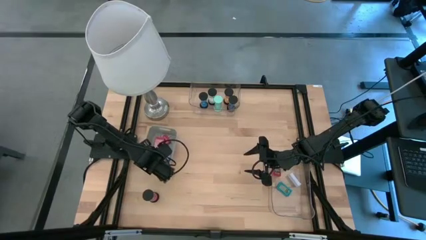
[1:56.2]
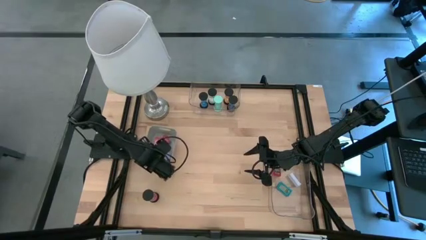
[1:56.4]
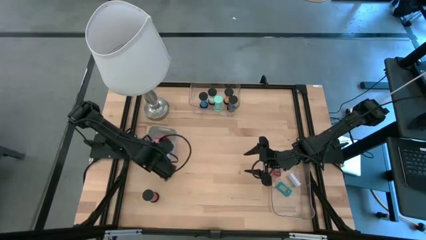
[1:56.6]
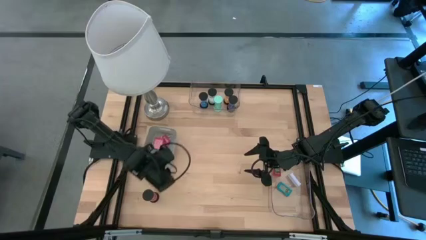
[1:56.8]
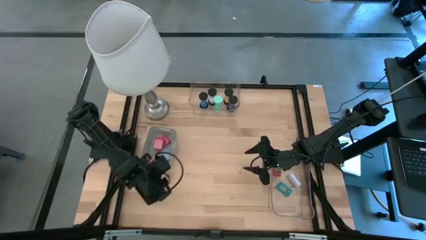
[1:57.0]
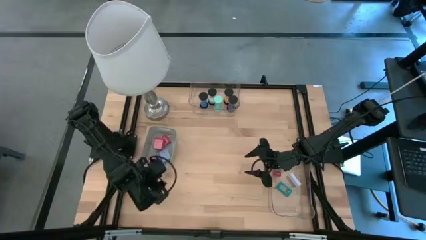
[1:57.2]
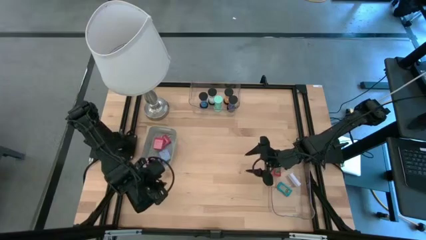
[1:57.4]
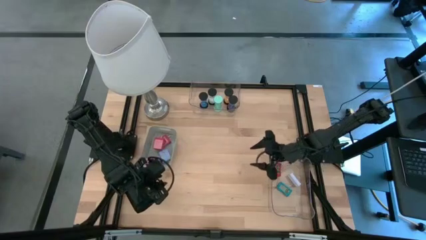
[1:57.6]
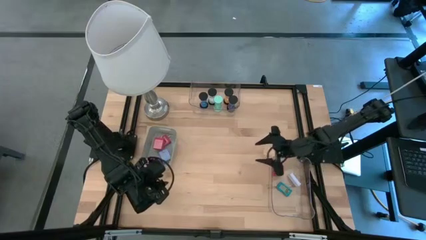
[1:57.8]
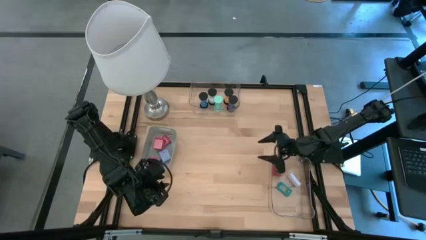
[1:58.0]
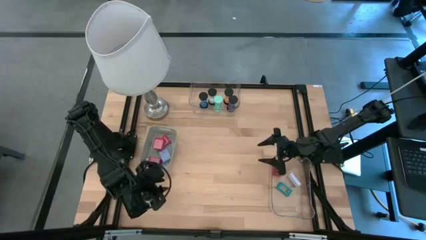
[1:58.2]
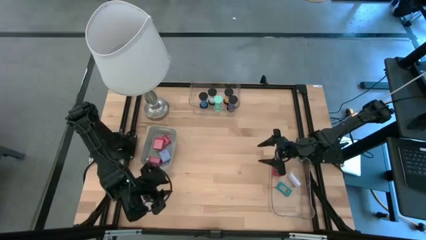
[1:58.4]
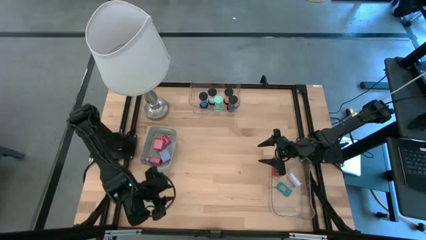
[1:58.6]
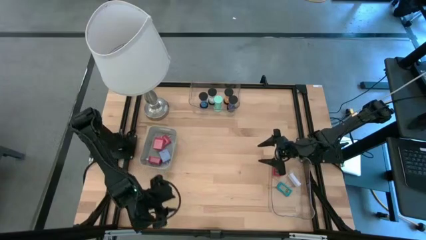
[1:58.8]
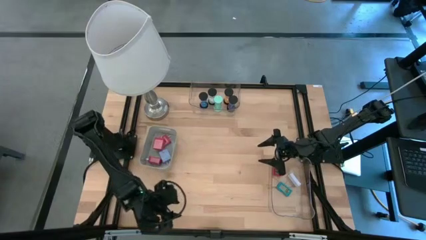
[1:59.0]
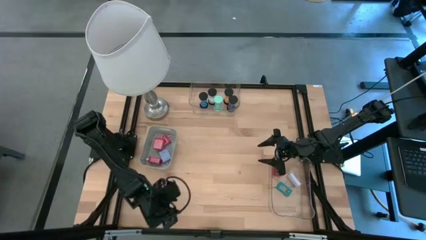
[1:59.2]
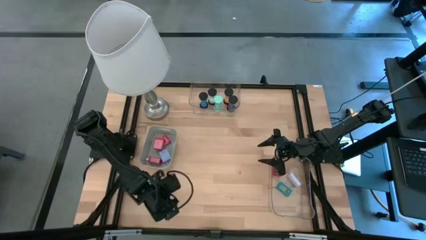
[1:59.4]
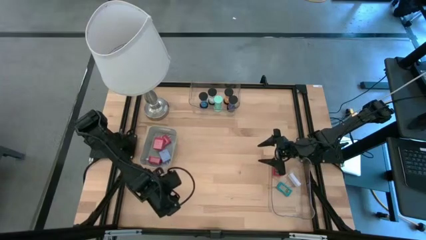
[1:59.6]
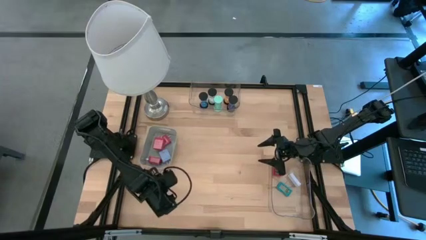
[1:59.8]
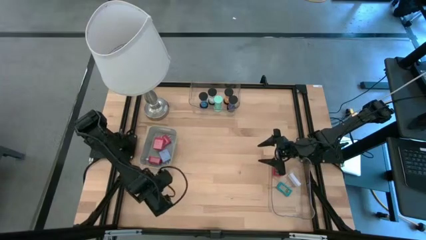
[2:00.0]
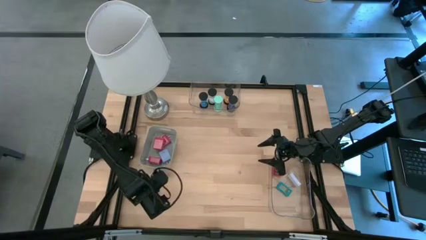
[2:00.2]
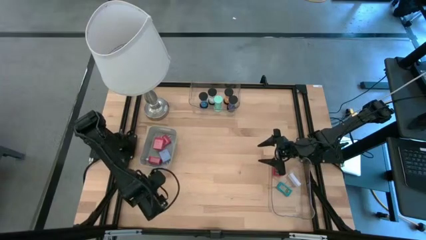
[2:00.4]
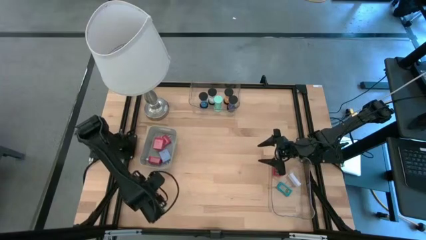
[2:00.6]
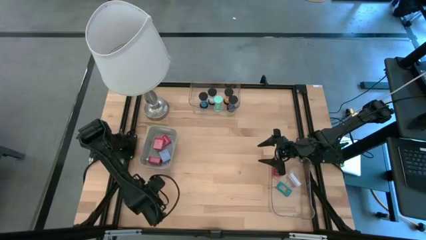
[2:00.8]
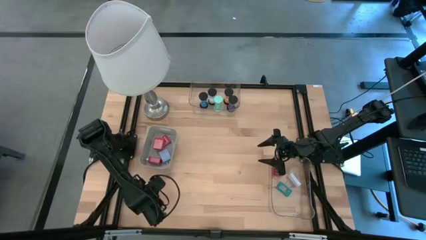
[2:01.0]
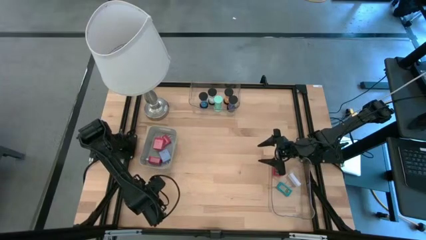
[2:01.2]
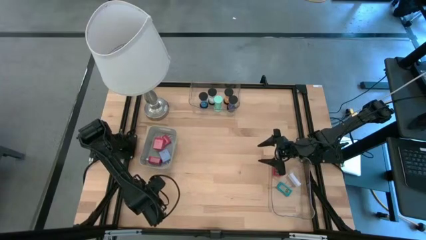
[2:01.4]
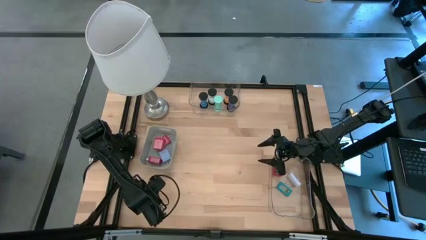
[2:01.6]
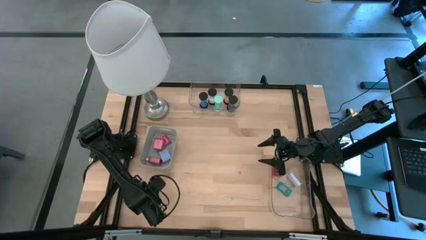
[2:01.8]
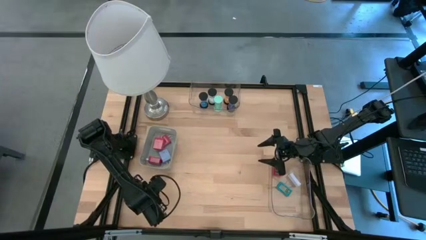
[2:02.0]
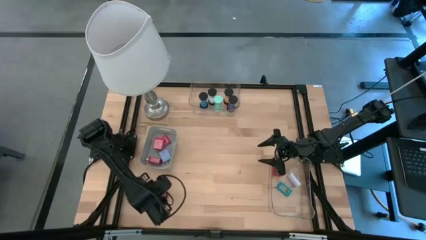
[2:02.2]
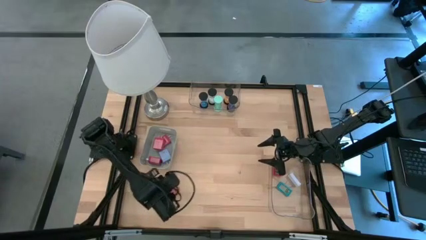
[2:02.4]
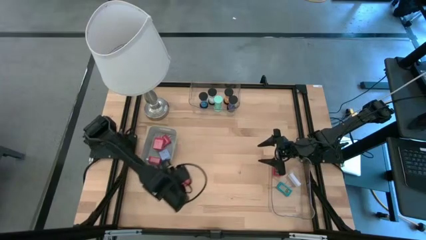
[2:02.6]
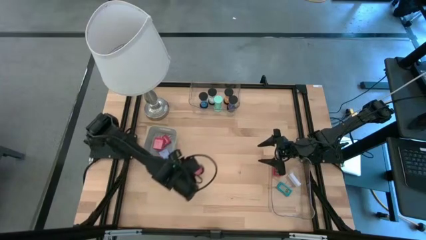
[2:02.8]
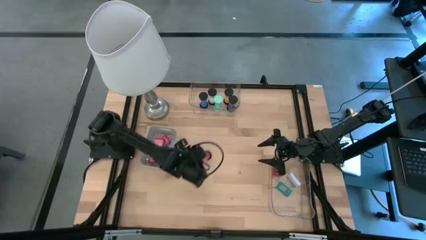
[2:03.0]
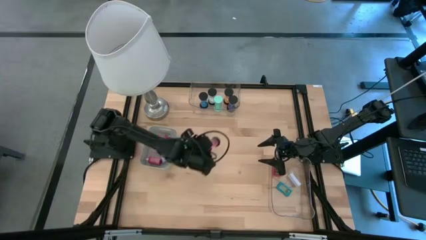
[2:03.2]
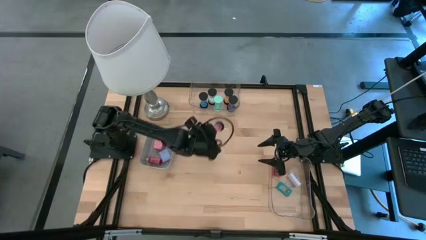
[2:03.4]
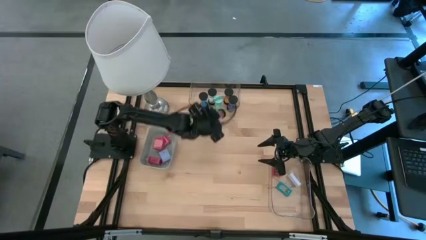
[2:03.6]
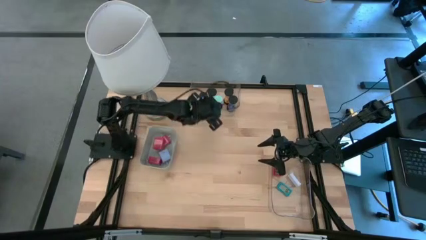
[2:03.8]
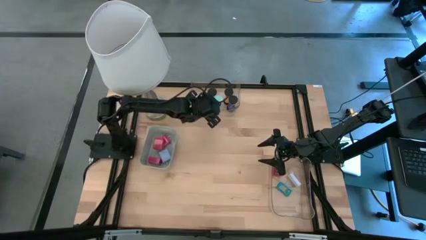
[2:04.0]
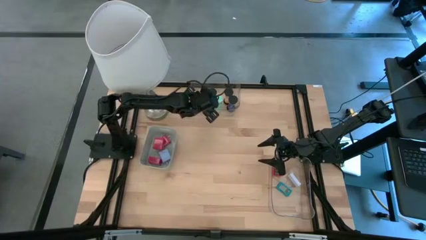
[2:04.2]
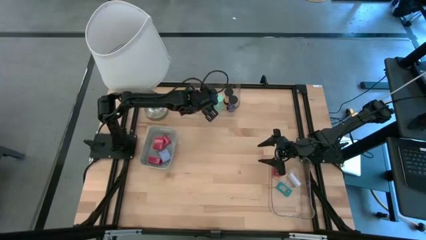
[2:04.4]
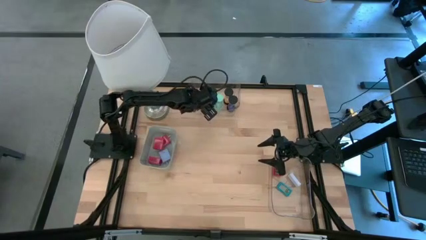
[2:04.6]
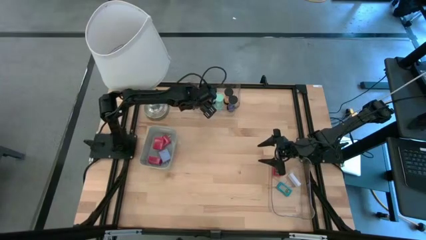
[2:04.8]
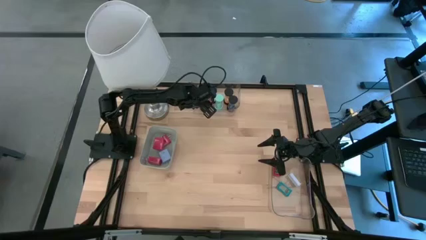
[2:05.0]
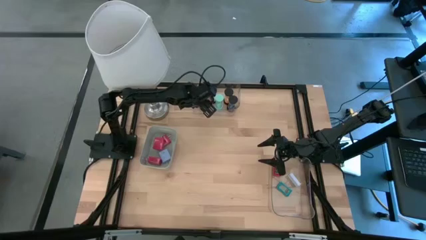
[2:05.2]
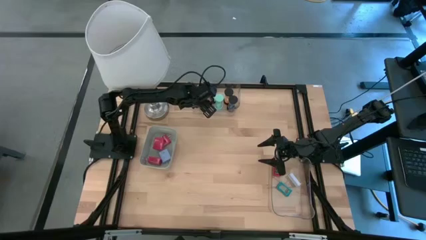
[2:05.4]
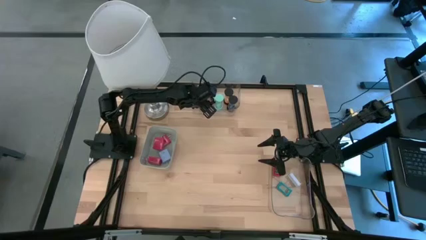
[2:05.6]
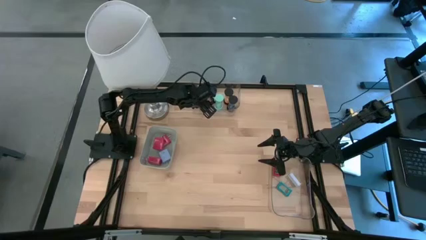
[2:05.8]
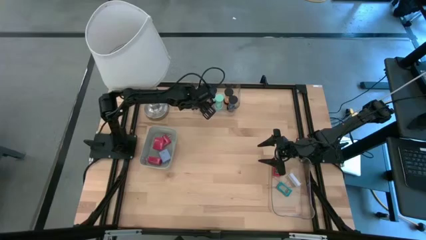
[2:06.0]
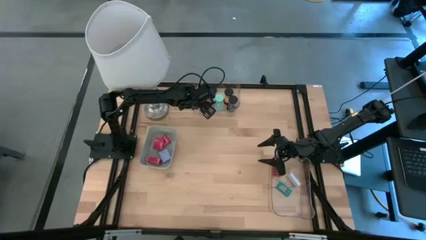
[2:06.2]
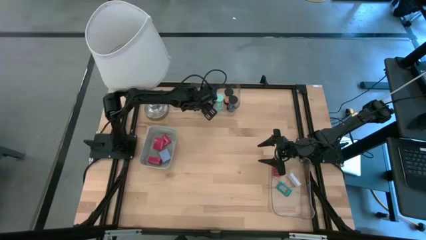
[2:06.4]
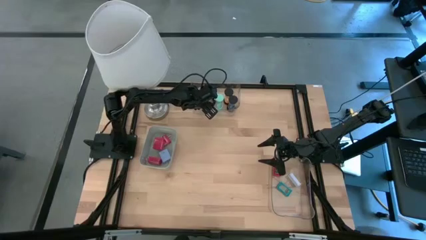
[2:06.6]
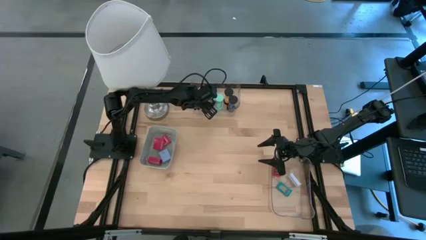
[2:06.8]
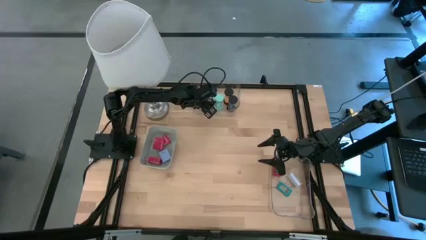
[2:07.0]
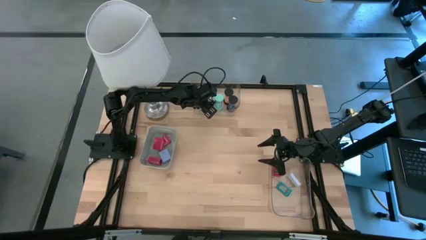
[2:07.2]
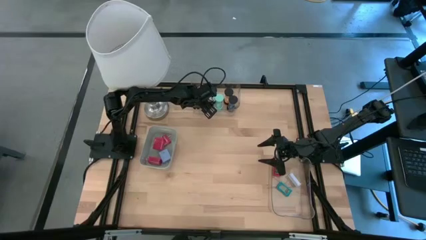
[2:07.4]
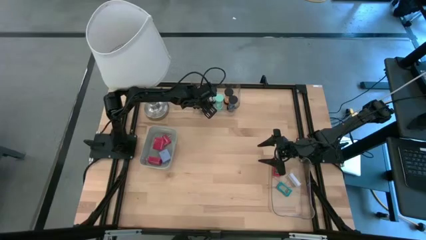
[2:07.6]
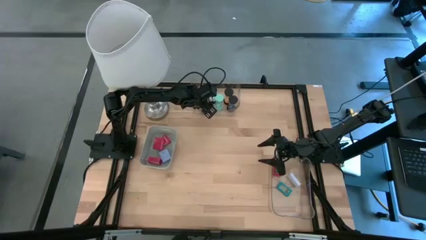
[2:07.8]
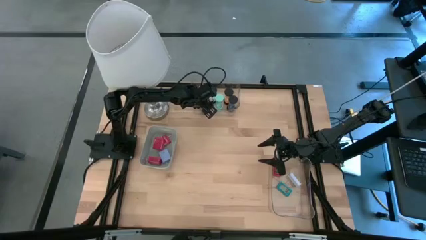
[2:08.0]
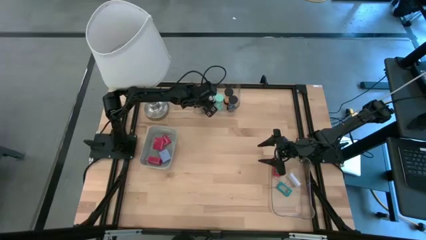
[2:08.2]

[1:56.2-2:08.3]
Task: Pick & Place Office items
Put the red hourglass into the top transparent bin

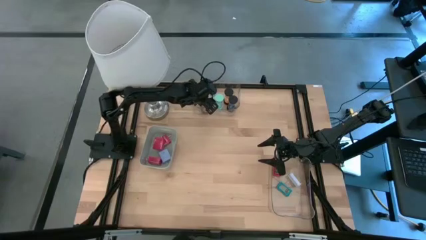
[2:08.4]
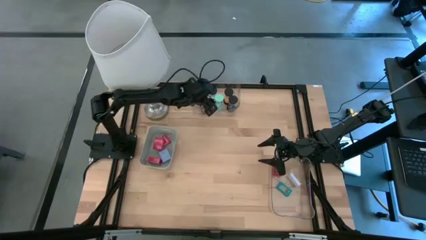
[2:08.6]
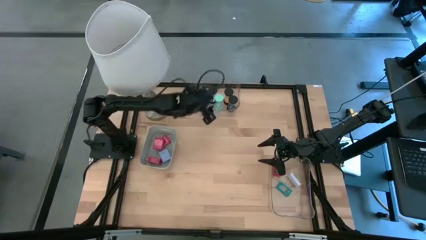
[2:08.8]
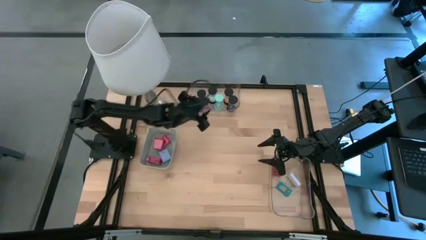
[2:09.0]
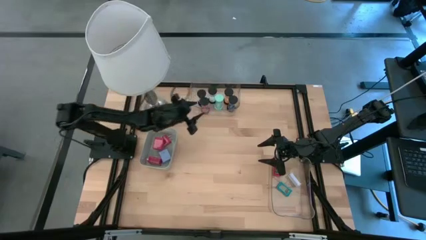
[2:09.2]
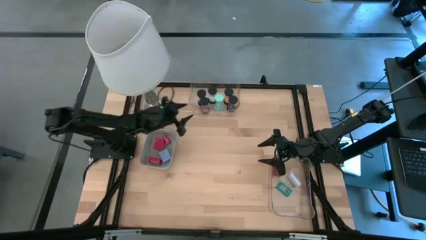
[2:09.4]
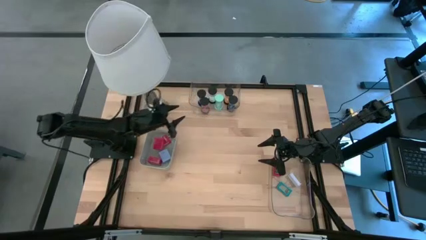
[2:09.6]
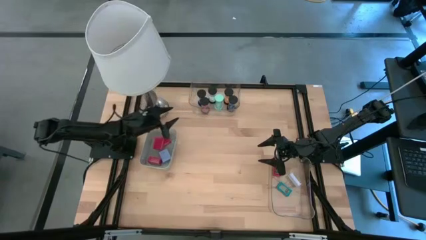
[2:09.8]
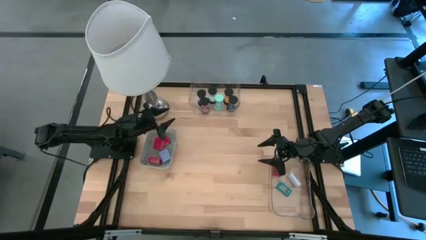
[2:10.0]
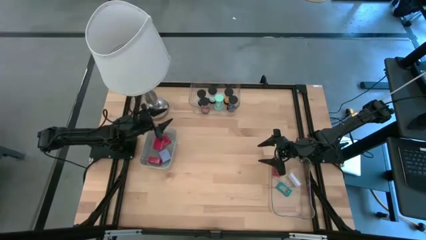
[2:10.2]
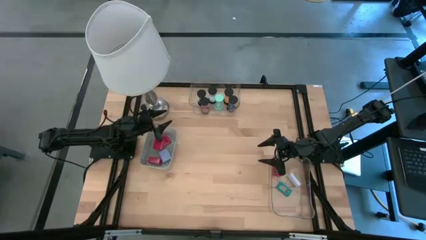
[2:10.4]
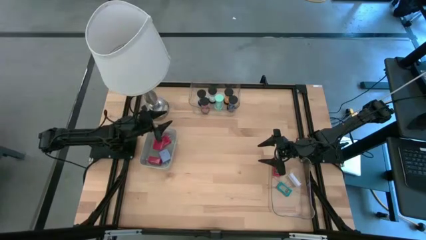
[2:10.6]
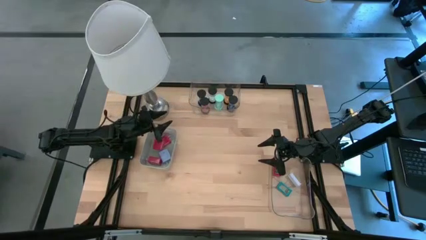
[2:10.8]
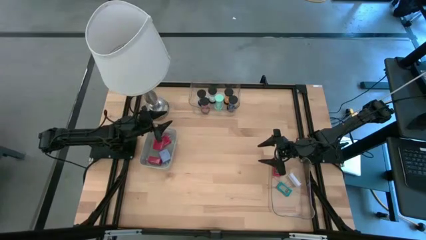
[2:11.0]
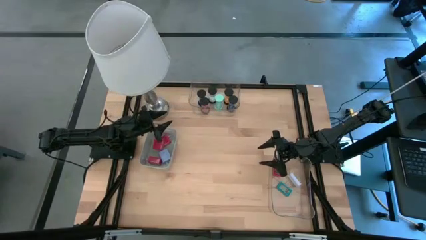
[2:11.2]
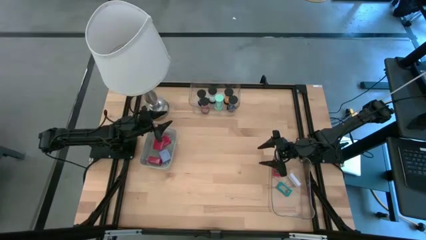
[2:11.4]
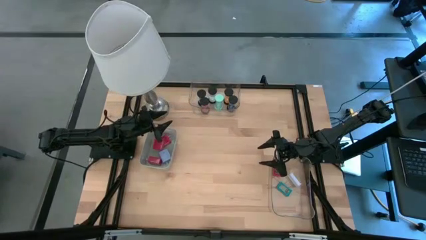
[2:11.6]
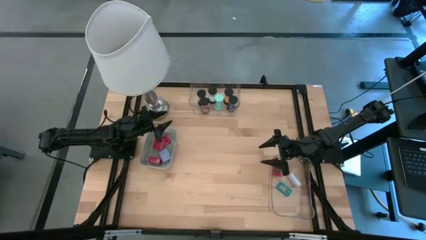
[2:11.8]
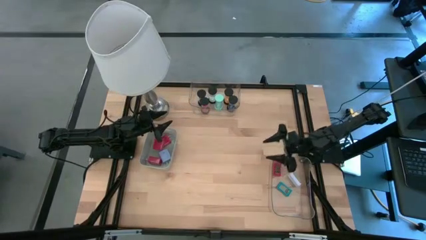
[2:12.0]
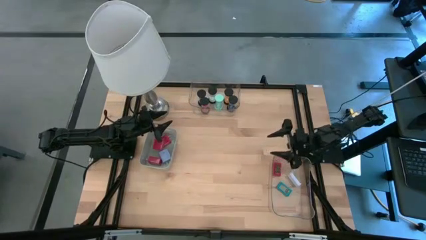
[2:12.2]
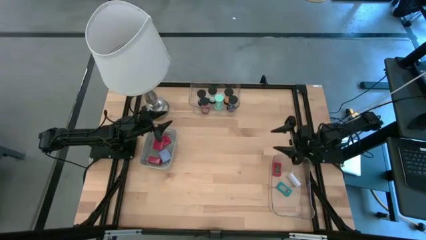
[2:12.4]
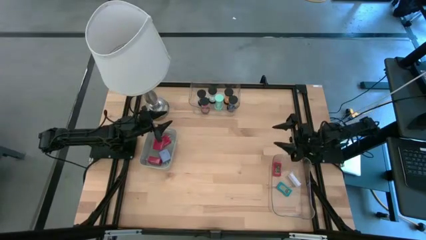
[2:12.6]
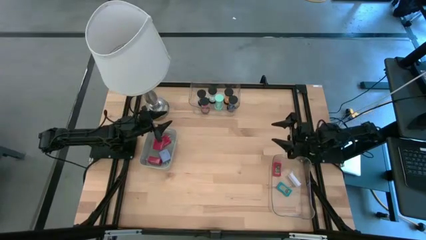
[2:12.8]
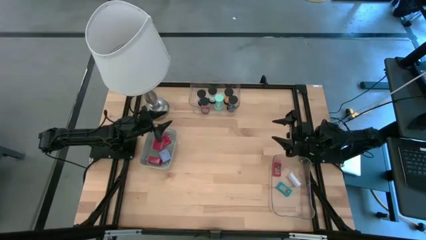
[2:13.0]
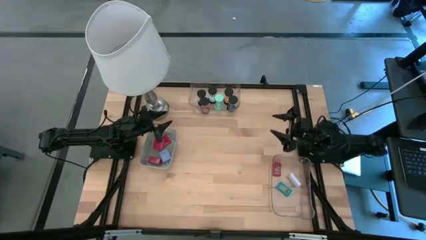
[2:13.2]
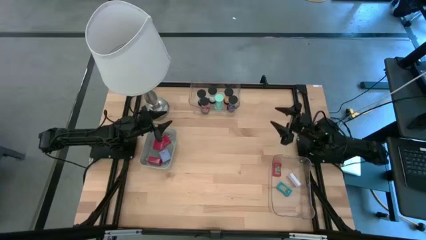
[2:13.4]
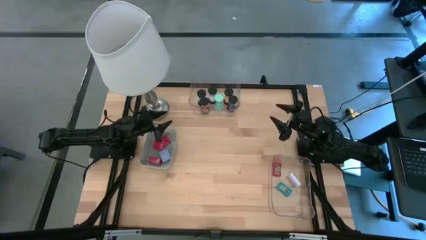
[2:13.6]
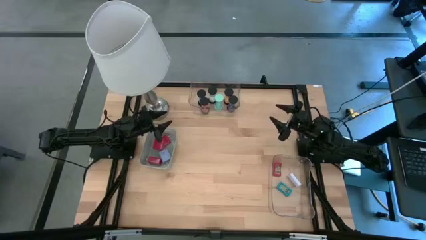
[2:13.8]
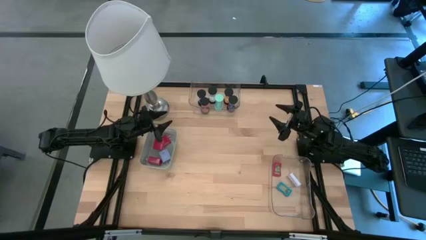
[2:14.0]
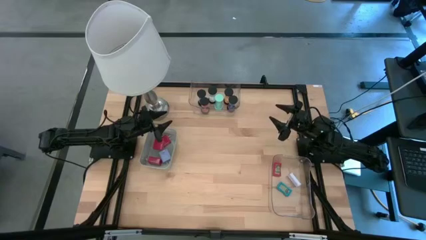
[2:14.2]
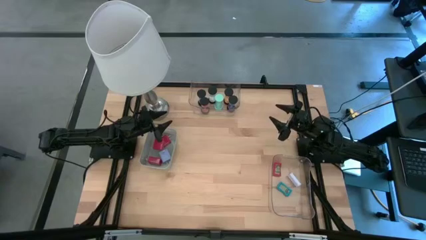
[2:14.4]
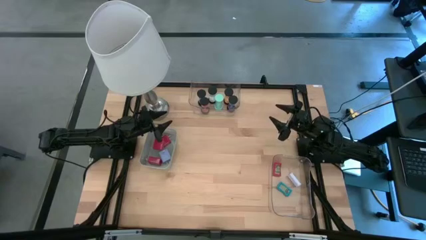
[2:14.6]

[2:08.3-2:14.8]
Return to Home Position
